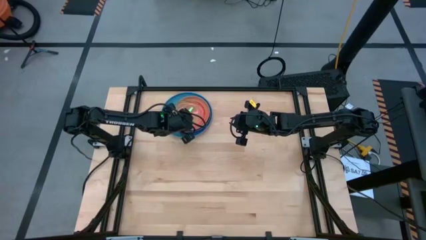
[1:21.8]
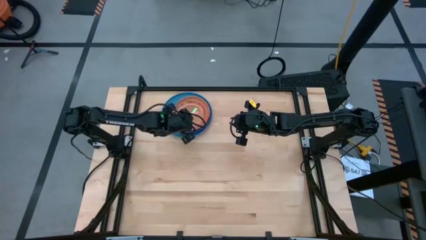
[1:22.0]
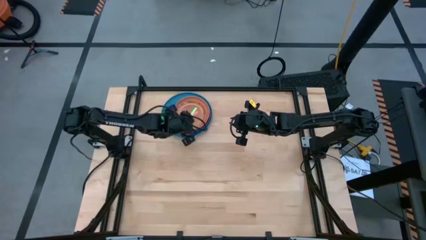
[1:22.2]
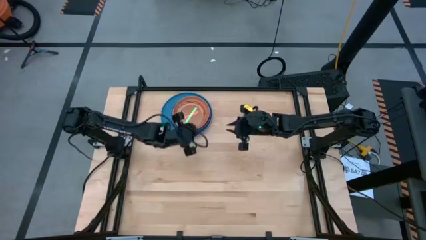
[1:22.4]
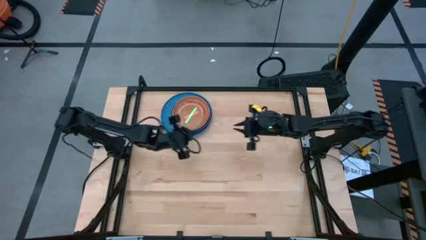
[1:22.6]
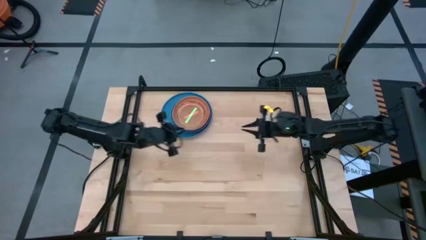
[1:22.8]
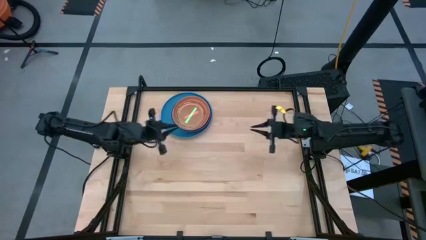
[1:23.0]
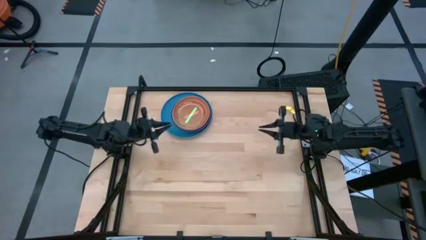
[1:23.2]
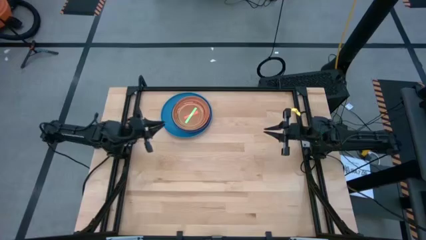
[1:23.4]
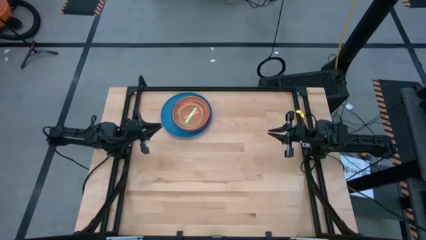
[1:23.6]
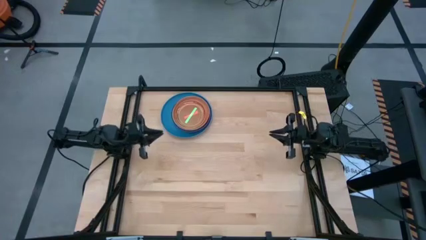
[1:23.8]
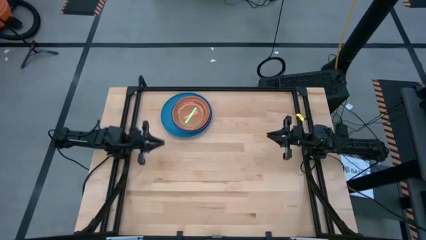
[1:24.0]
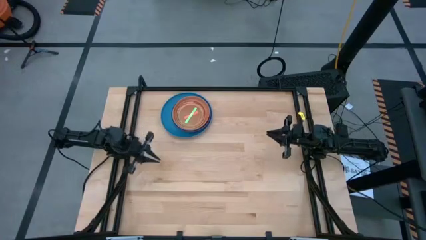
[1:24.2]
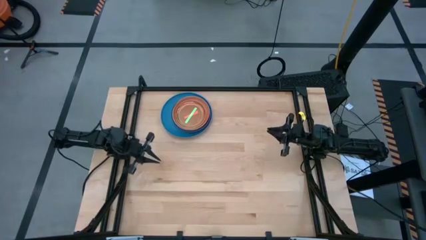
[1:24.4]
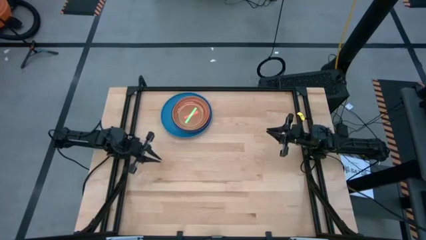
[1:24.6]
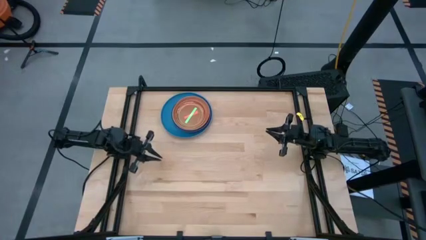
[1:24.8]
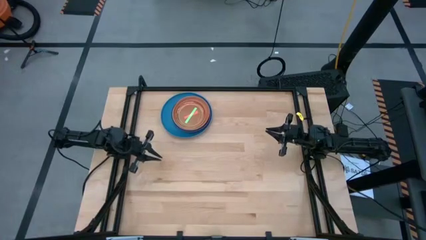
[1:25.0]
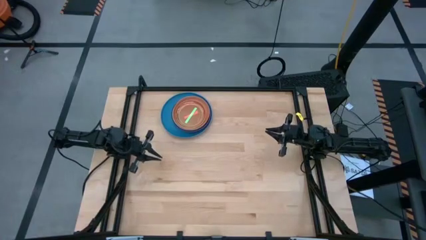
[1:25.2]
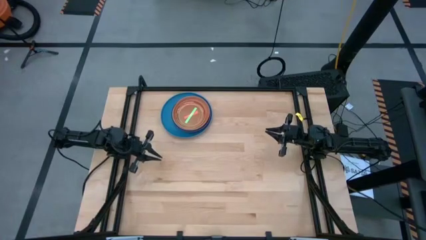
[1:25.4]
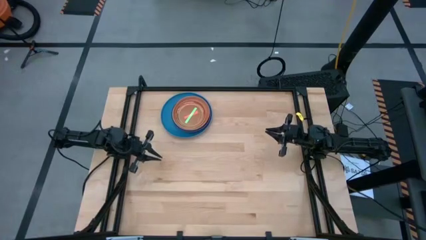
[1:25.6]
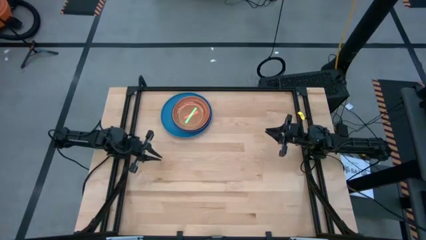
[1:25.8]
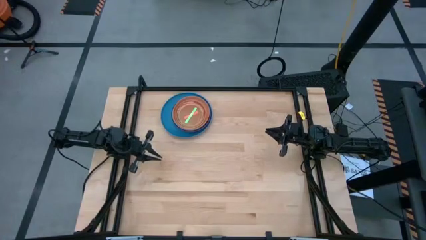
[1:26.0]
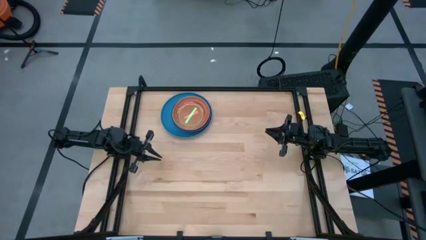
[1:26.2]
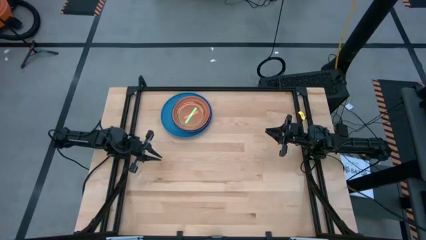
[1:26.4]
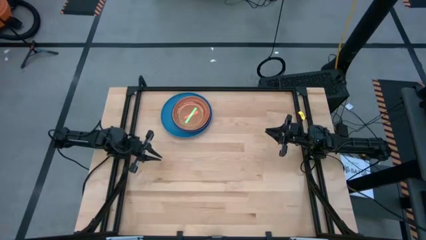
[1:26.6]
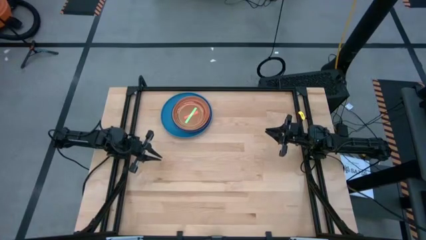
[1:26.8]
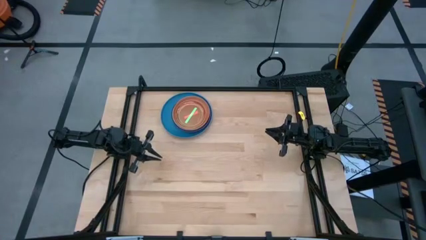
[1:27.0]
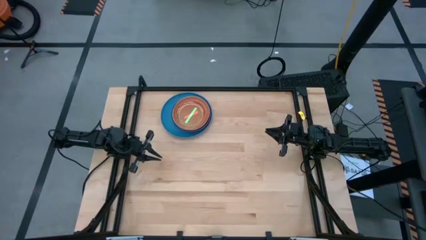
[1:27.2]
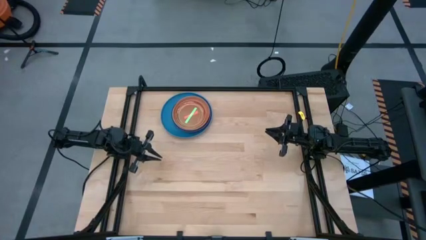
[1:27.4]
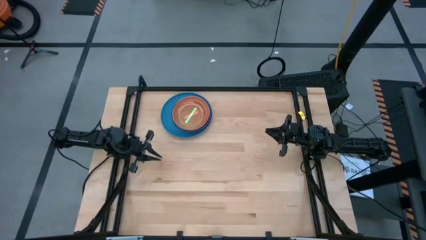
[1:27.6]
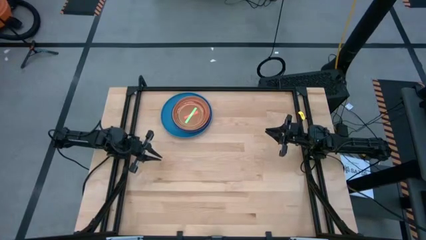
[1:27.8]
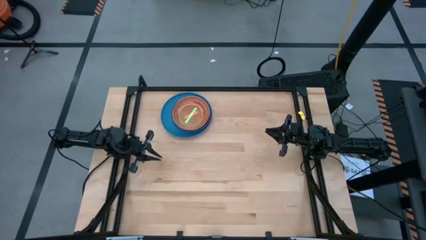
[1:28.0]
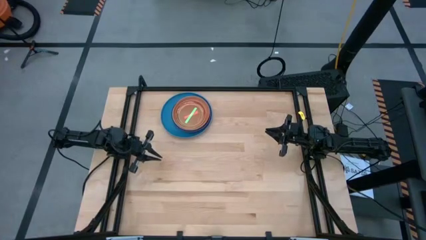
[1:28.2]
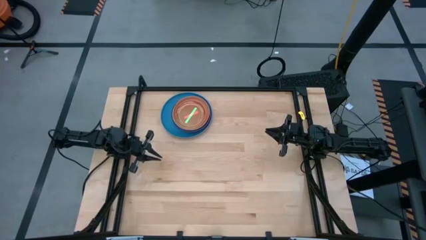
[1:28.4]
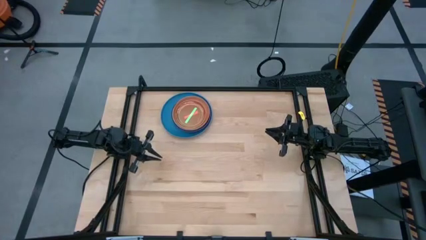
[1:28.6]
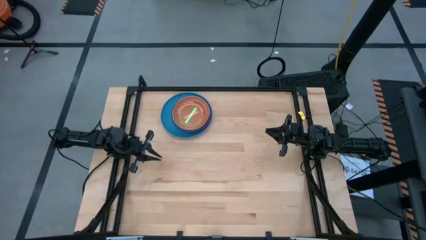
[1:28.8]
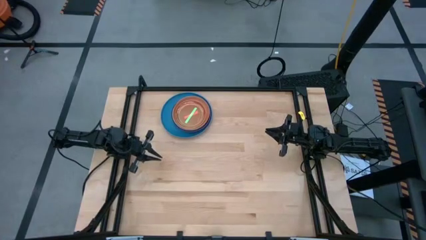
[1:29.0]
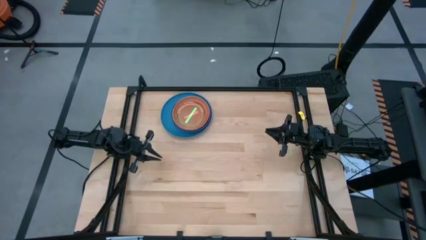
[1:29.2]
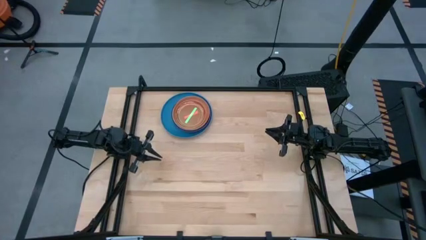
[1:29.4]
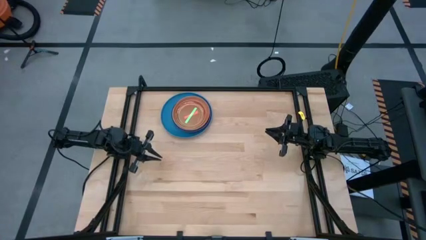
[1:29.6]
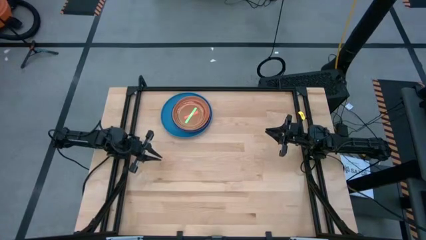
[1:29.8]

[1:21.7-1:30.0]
Task: Stack plastic plates
Return to Home Position

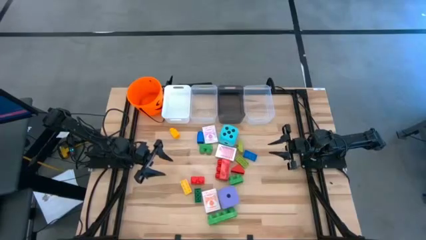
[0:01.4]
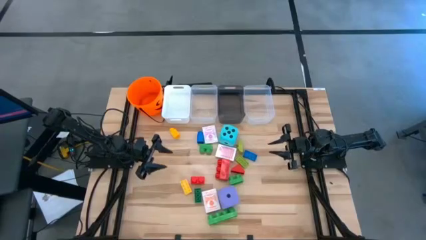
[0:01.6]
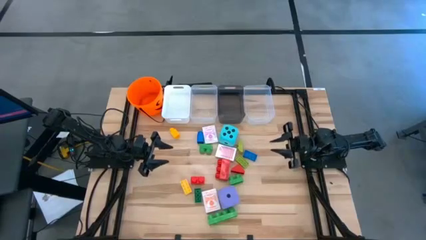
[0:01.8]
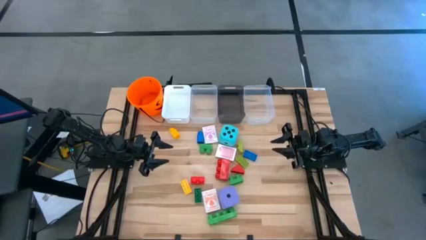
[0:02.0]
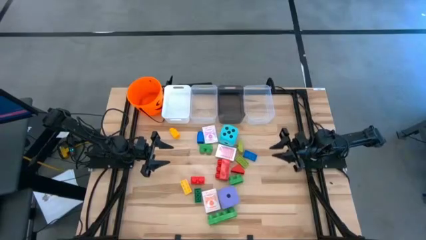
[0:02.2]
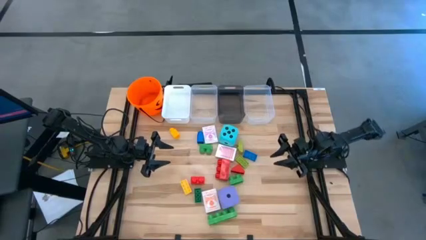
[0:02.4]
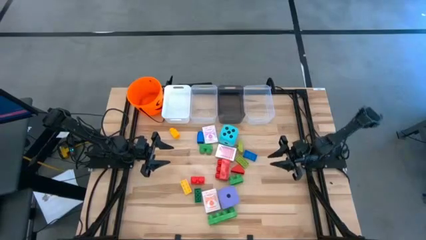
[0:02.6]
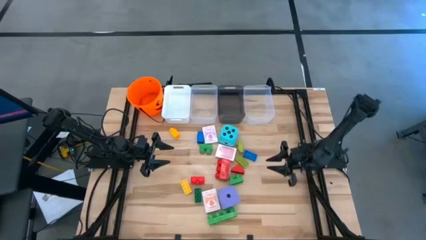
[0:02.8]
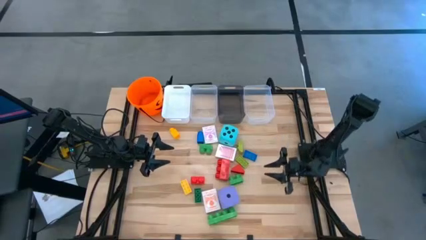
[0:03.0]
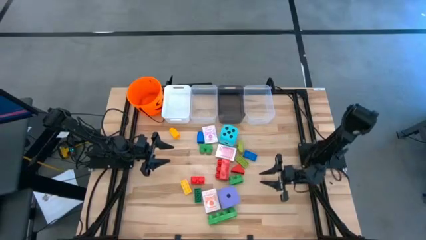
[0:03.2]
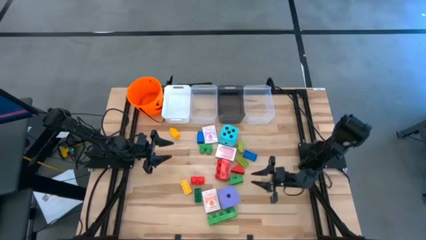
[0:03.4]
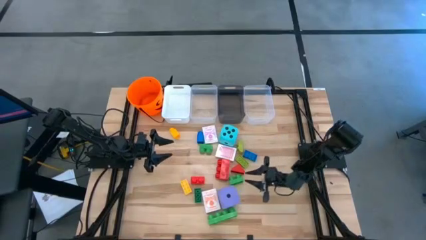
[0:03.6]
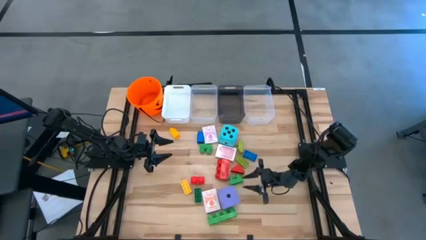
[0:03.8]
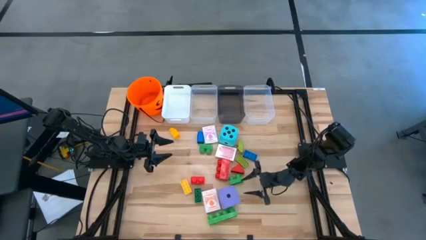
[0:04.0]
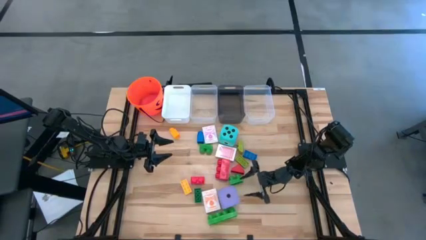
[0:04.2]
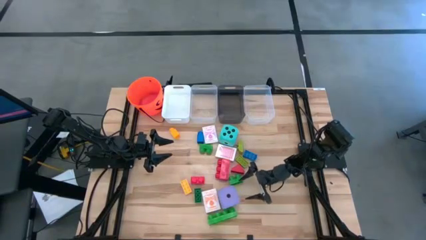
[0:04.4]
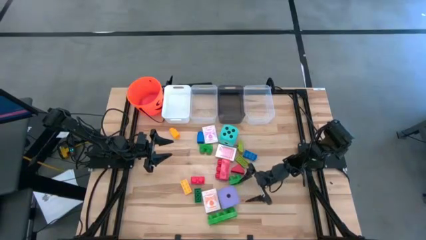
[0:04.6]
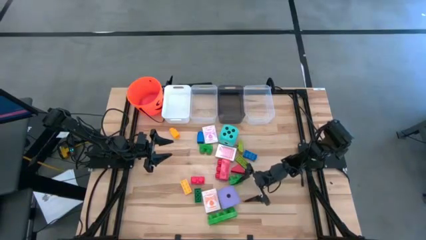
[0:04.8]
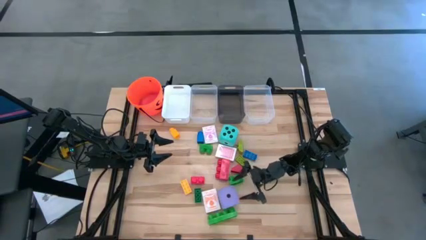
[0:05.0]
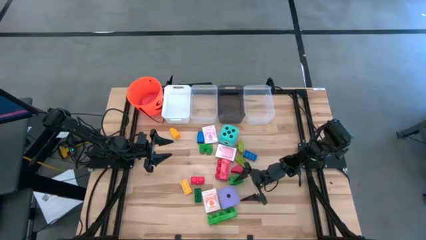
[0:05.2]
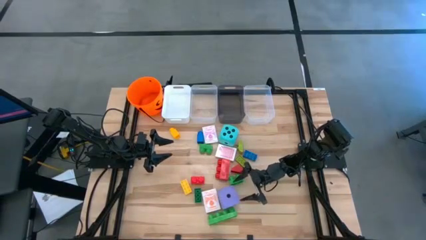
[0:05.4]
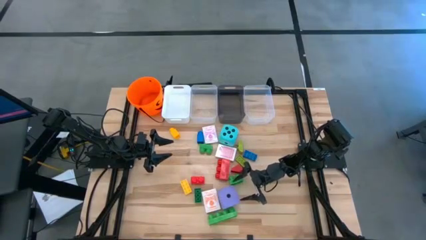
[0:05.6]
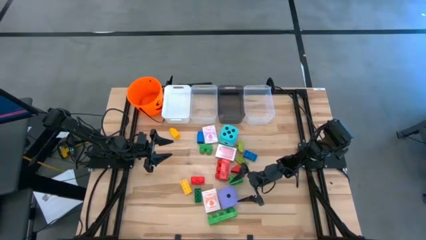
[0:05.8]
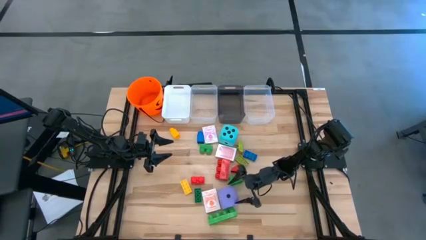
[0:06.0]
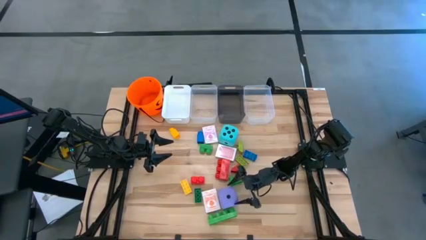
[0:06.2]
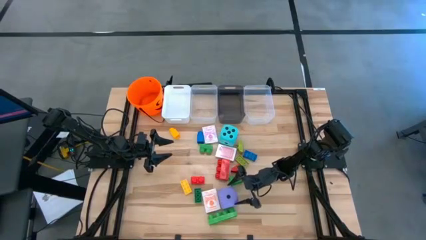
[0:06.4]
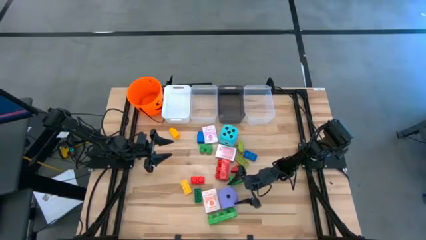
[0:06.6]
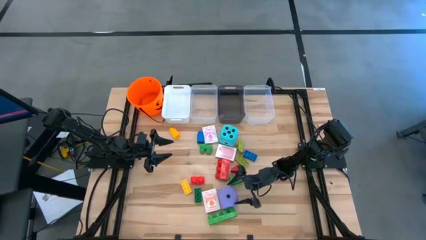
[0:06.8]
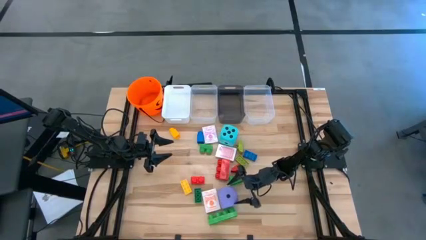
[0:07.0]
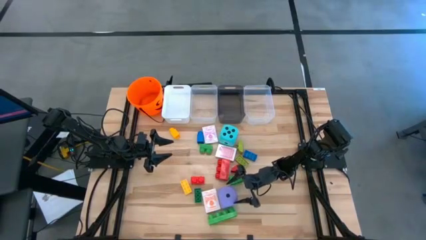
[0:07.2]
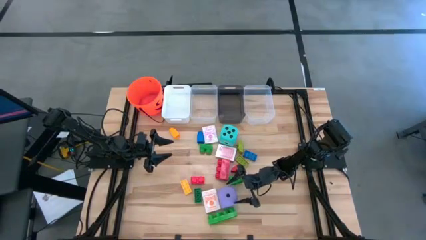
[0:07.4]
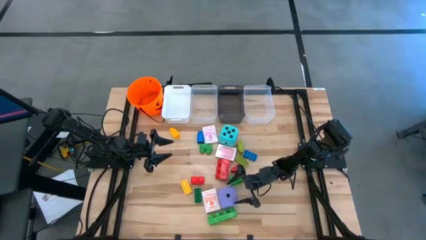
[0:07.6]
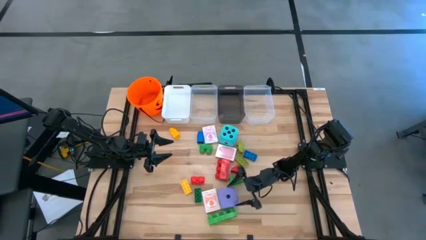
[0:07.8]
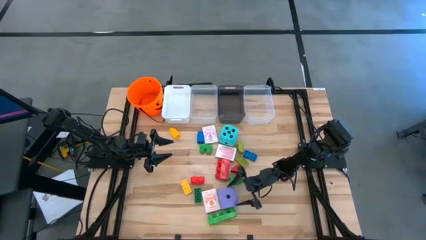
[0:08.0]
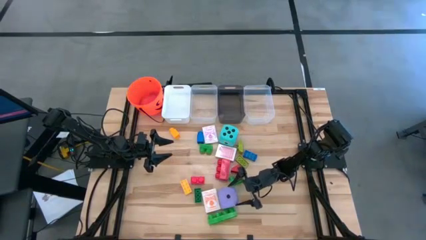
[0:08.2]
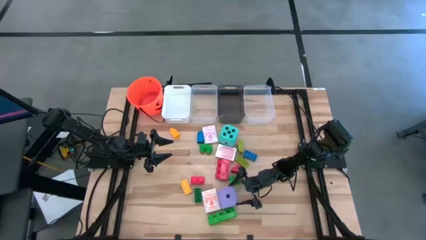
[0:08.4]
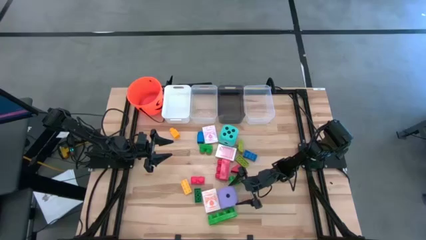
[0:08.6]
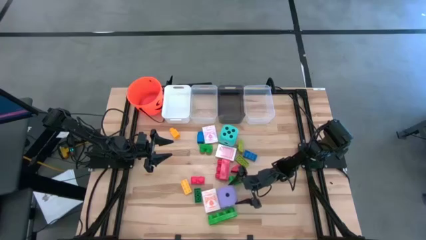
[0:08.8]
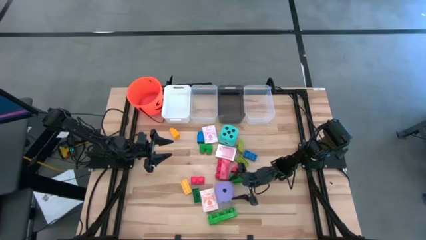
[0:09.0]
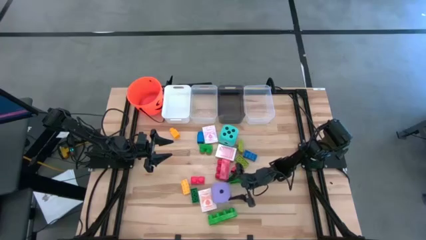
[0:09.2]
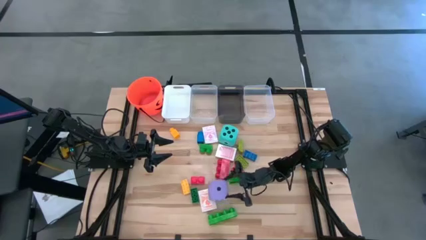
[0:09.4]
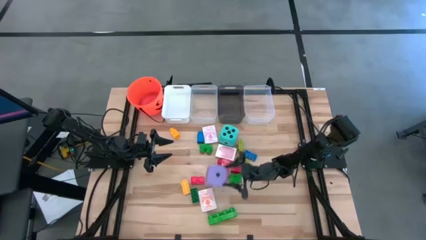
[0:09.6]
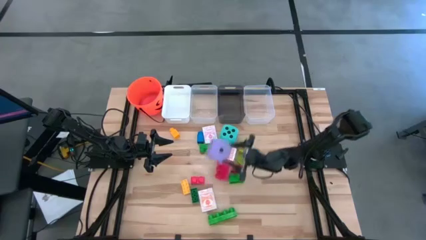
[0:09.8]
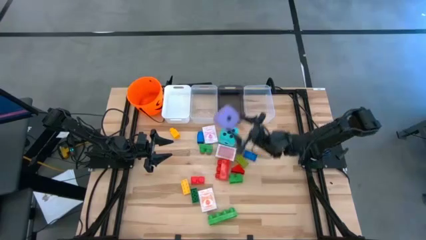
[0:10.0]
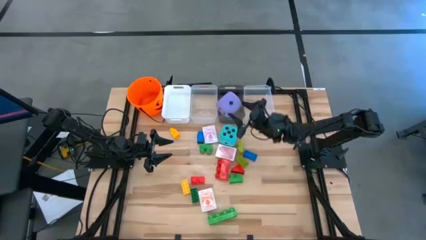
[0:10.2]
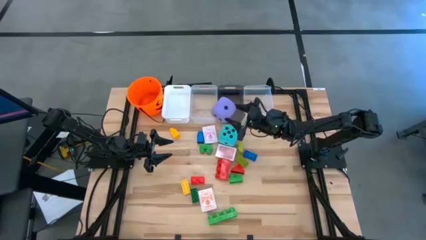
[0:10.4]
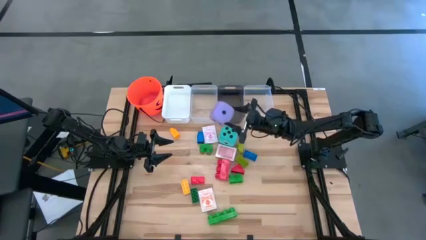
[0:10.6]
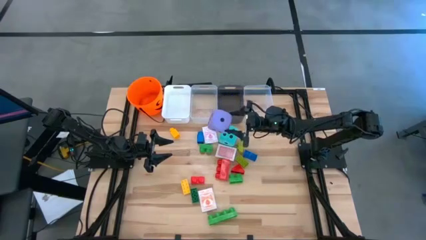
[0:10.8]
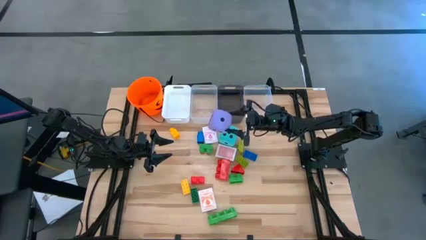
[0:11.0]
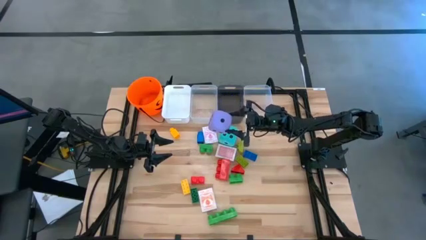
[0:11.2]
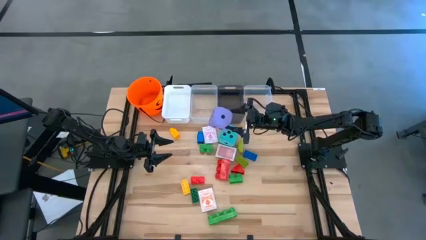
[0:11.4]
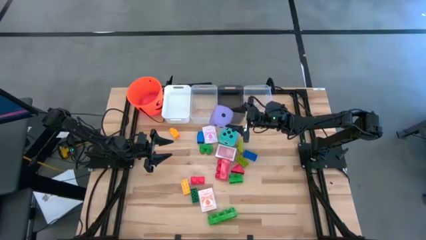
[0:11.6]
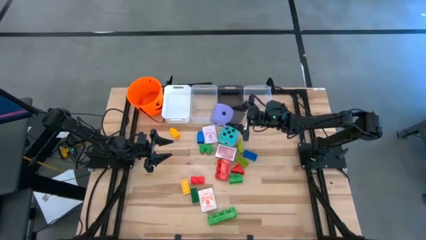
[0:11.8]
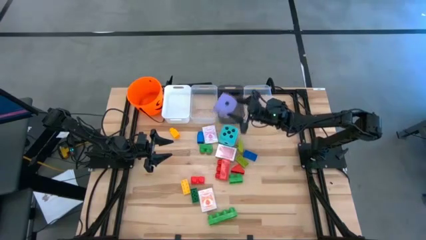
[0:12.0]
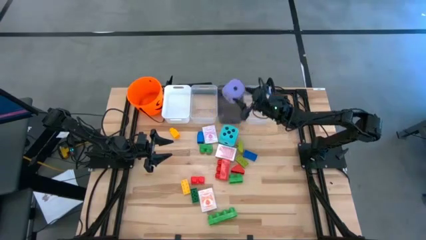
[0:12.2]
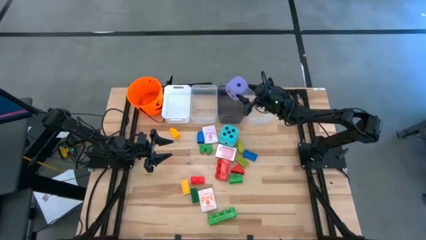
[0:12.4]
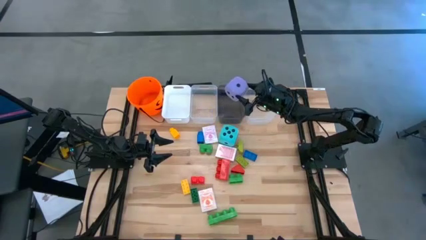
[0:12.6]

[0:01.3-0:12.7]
Task: Pick & Place Toys
Put the purple die into the black bin
